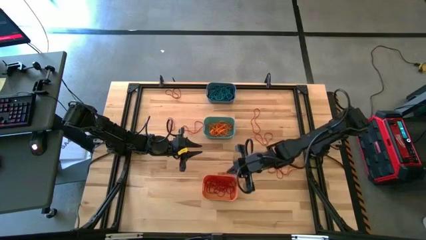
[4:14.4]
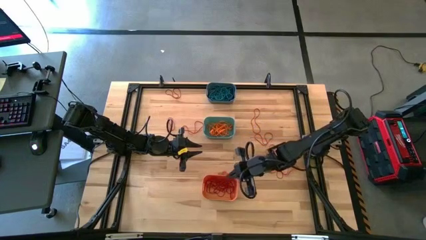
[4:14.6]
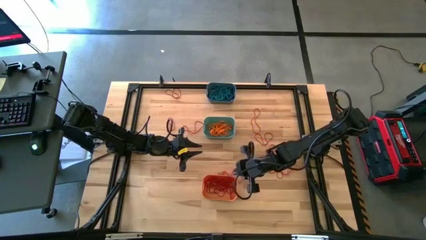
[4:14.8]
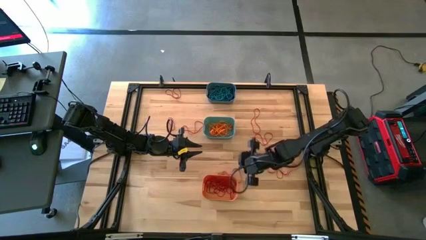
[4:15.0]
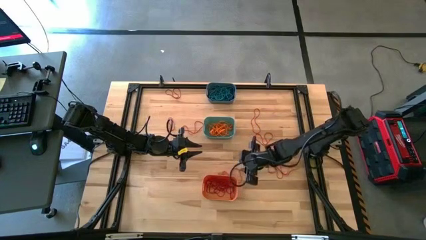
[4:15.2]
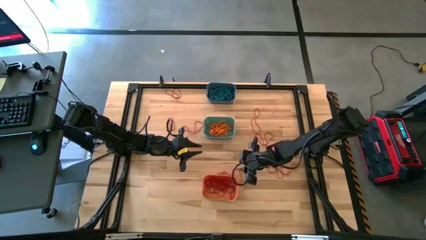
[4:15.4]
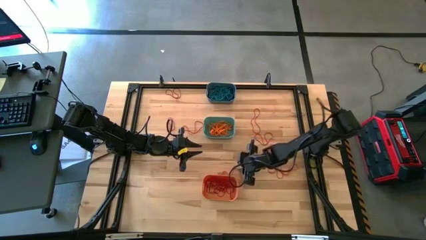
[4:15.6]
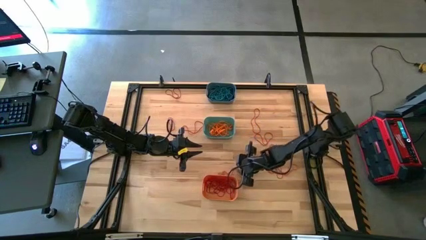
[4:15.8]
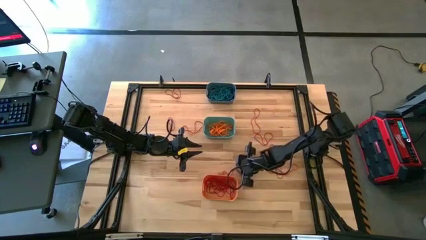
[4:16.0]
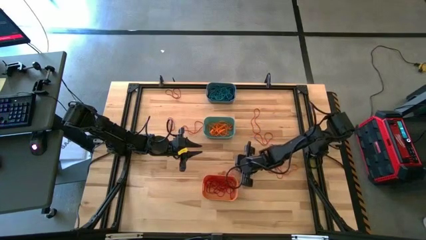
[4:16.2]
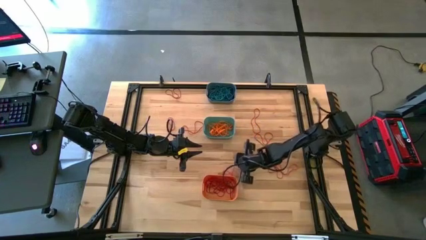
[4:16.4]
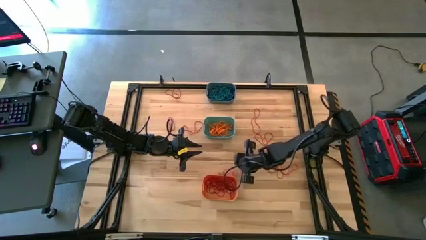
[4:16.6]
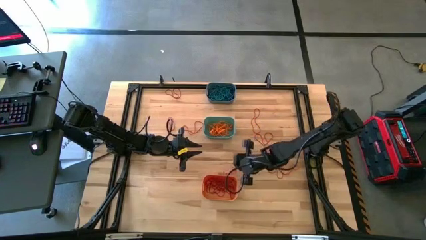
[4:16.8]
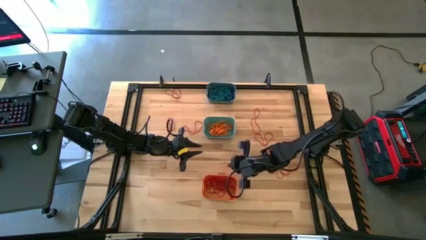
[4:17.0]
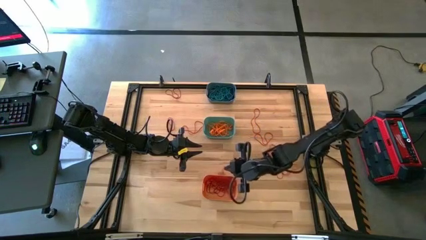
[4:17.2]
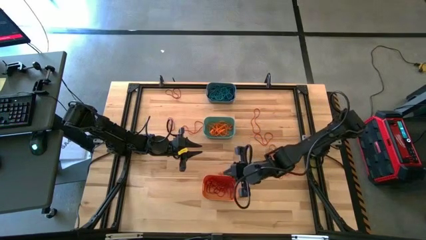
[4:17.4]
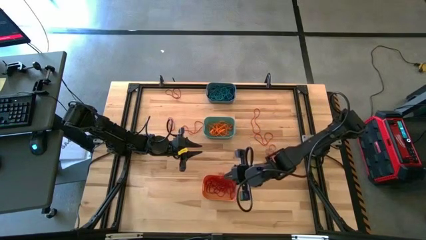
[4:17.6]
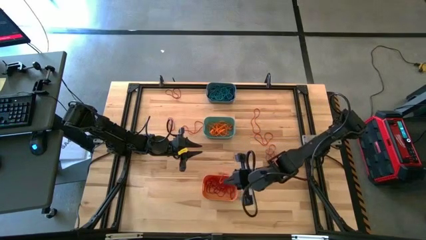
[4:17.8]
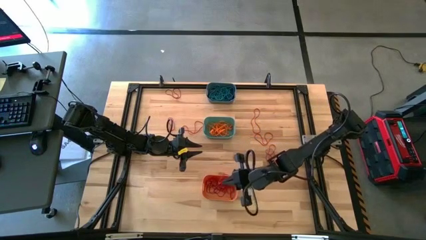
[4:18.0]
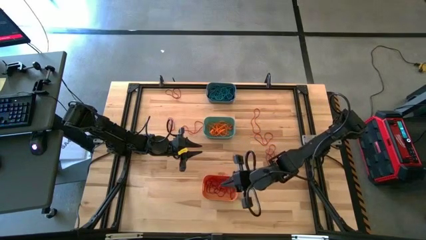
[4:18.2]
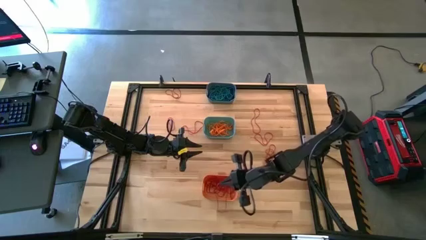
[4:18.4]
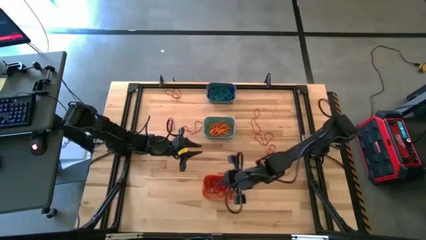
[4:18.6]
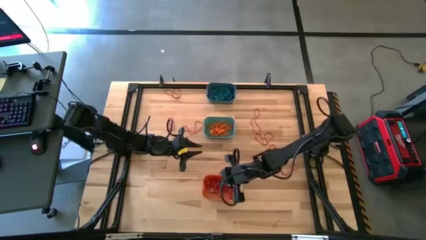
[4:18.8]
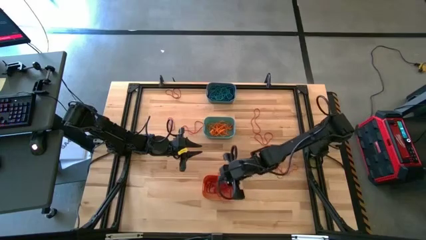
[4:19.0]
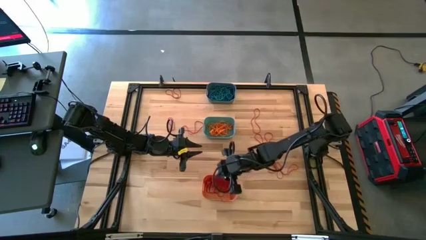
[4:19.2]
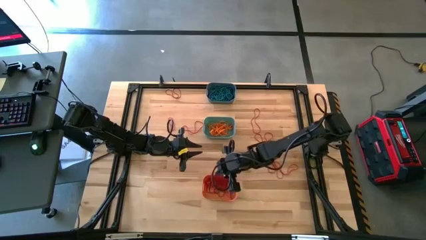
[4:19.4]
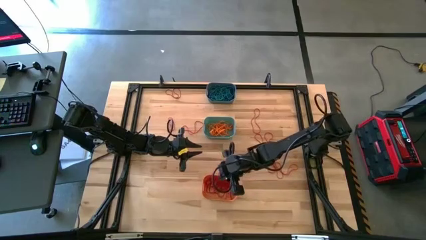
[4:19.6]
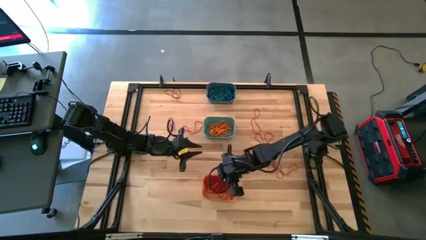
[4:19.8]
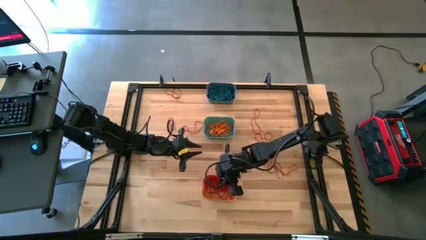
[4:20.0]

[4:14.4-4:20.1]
Task: Sort rubber bands into baskets
Put the red rubber band into the orange bin

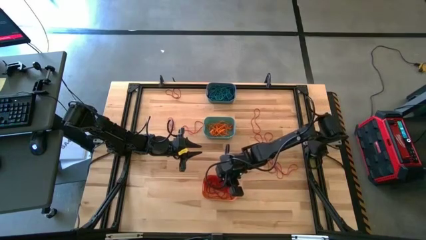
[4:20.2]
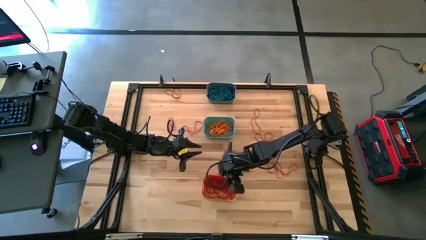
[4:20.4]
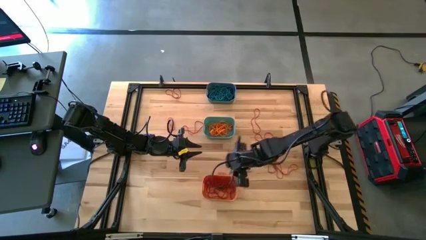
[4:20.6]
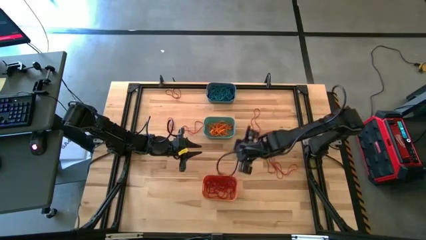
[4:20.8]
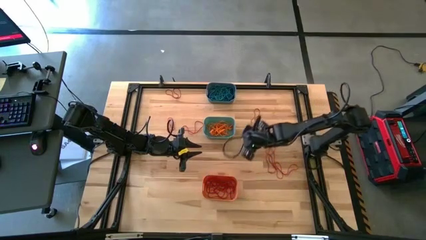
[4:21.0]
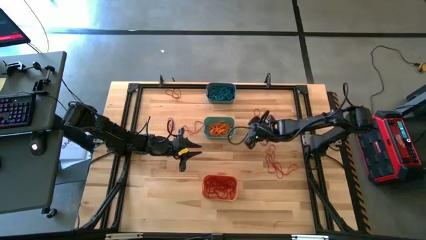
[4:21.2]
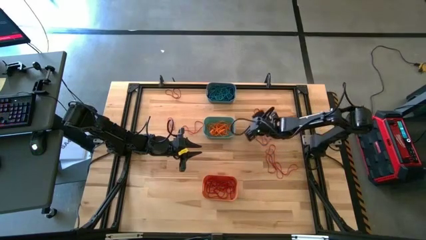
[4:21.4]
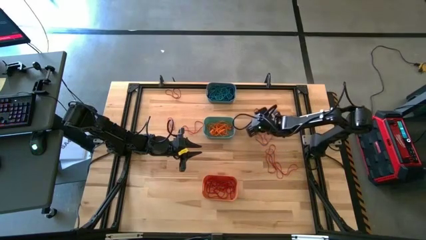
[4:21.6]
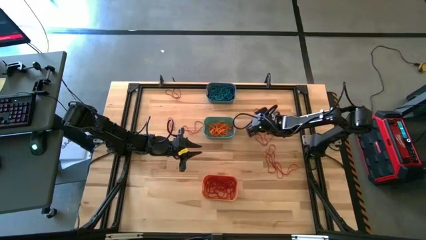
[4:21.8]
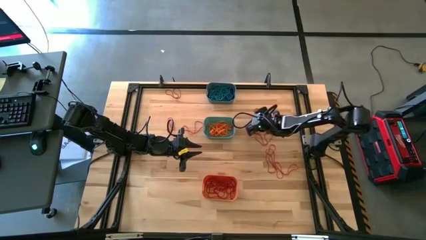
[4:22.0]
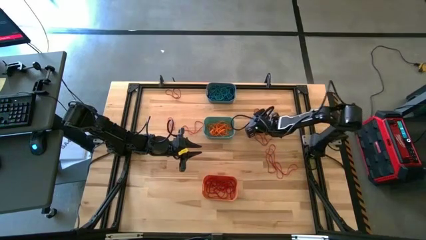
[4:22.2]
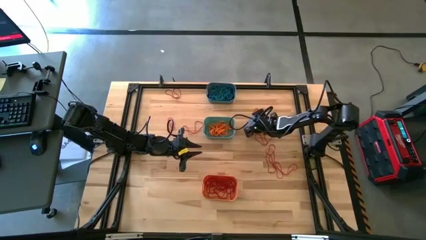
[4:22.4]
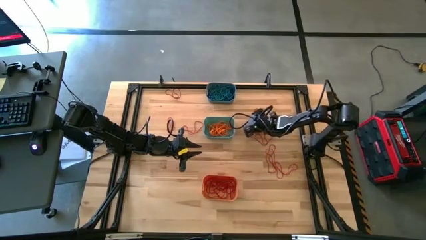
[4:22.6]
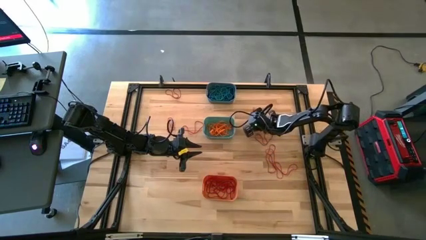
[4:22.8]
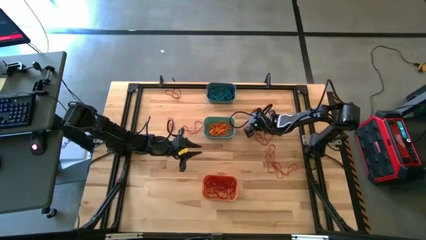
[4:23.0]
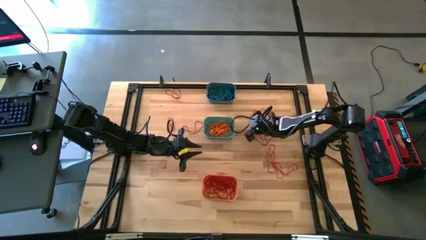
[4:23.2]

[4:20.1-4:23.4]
Put the red rubber band into the orange bin

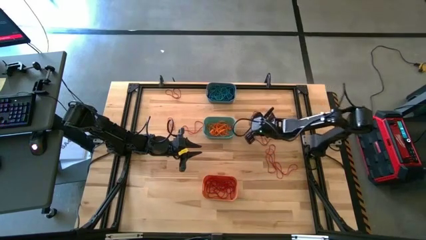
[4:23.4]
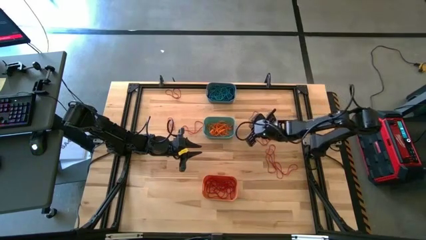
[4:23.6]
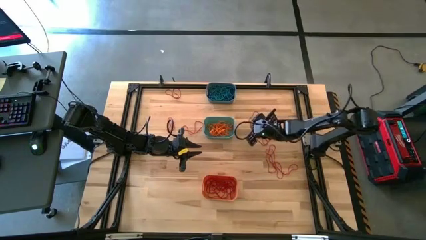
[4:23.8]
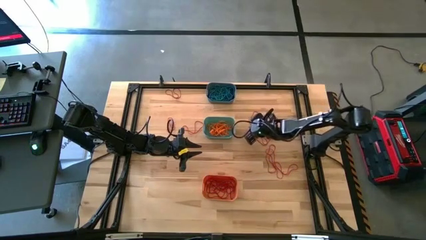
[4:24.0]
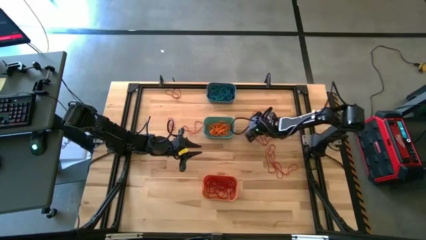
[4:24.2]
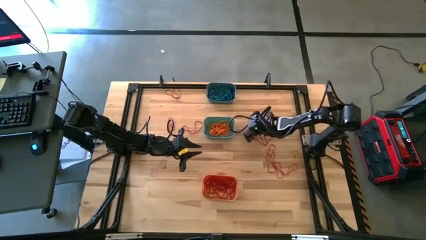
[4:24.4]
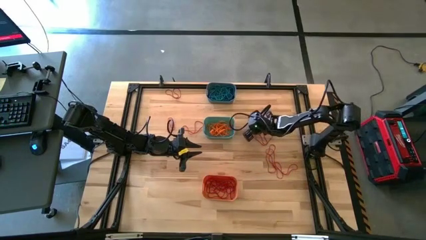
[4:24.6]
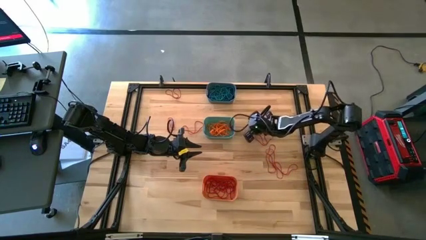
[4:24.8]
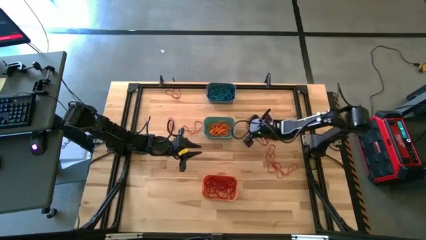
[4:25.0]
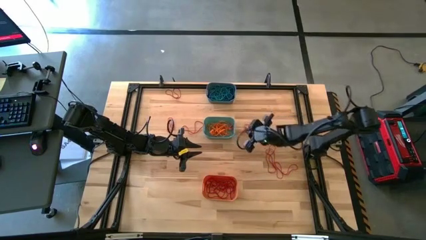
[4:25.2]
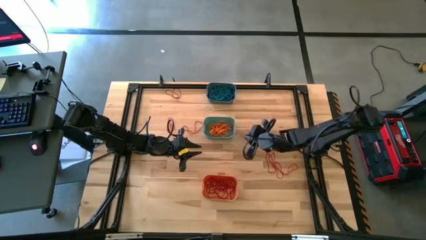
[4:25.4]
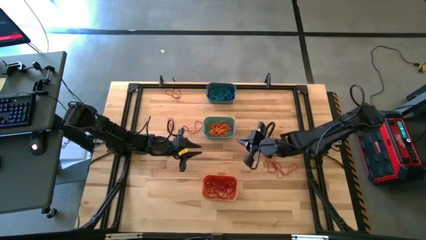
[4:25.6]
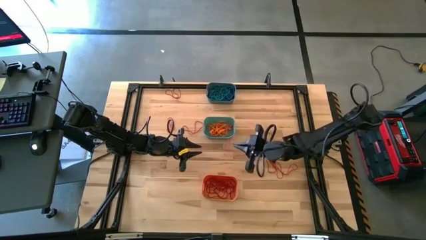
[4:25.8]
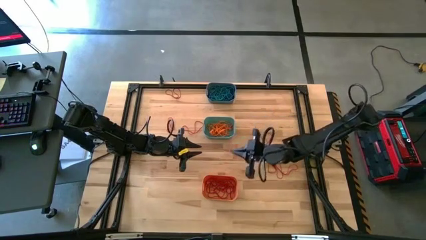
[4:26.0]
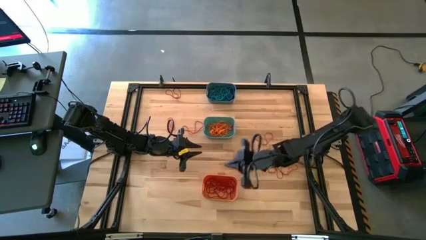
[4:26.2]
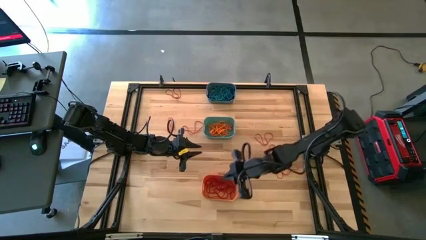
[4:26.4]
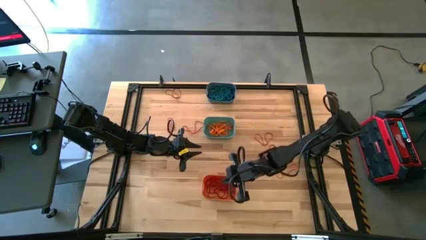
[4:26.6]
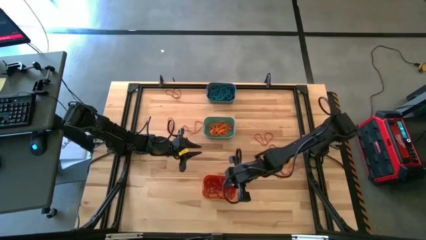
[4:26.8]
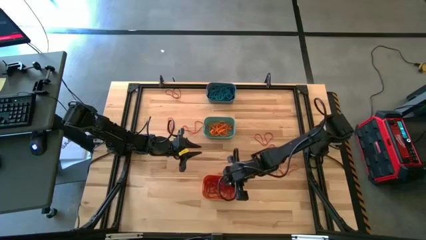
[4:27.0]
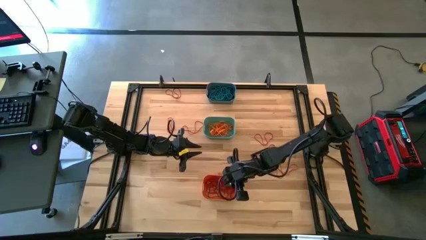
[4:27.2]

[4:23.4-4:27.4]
Put the red rubber band into the orange bin

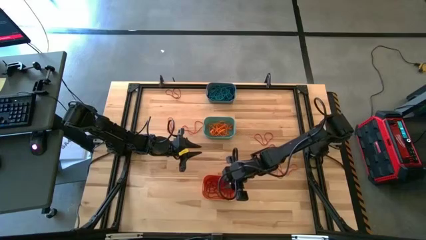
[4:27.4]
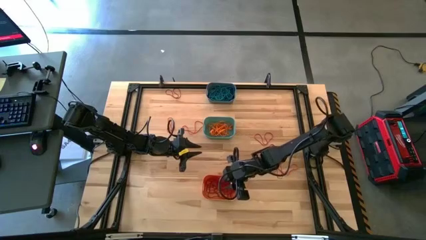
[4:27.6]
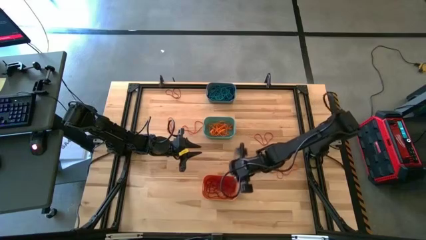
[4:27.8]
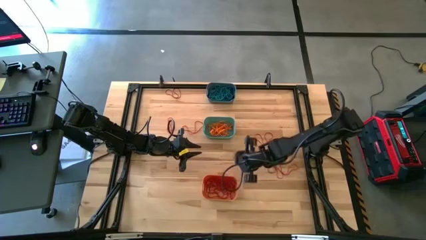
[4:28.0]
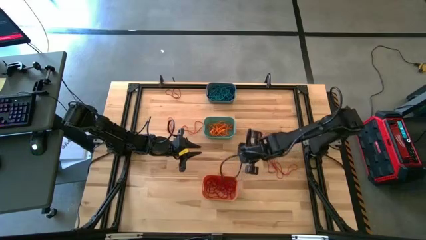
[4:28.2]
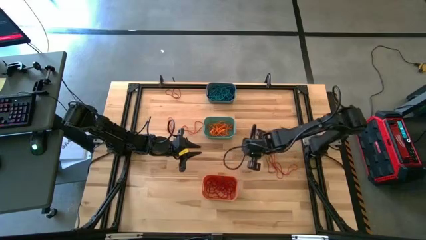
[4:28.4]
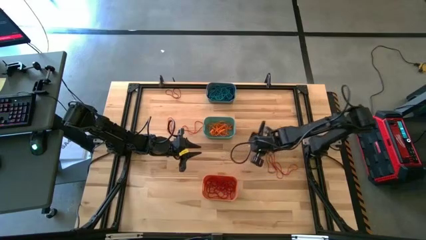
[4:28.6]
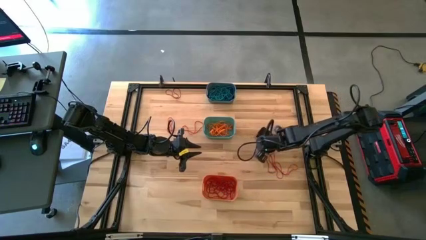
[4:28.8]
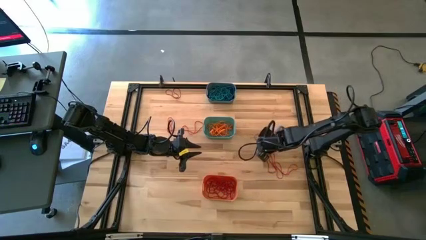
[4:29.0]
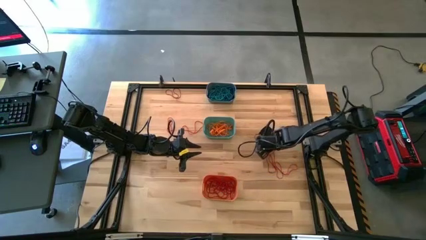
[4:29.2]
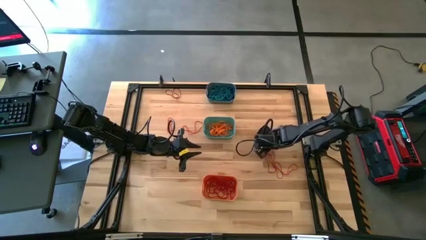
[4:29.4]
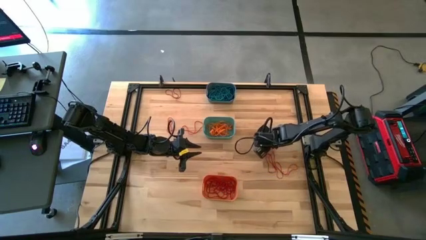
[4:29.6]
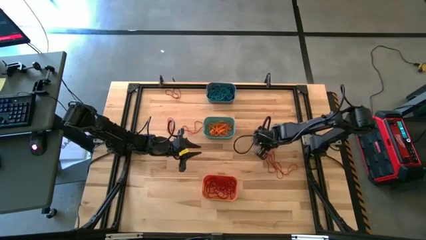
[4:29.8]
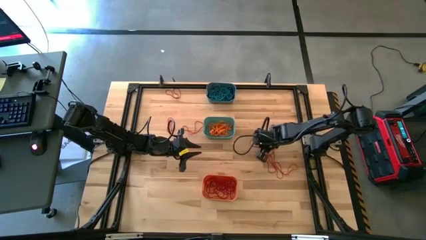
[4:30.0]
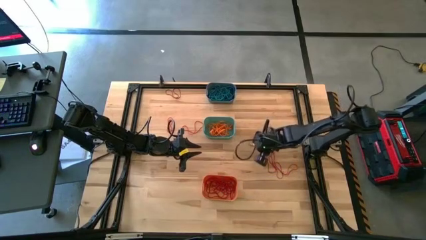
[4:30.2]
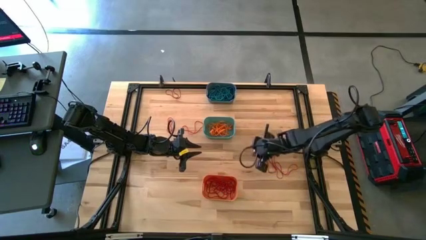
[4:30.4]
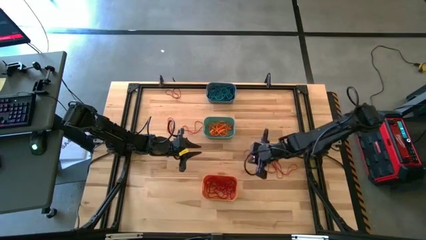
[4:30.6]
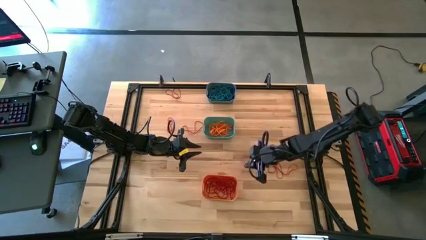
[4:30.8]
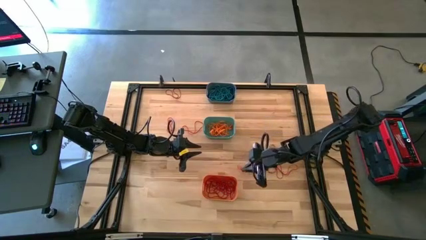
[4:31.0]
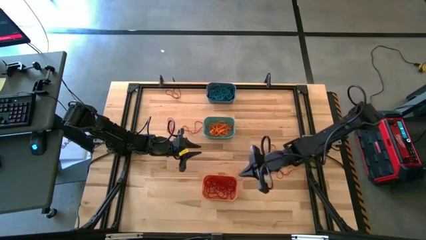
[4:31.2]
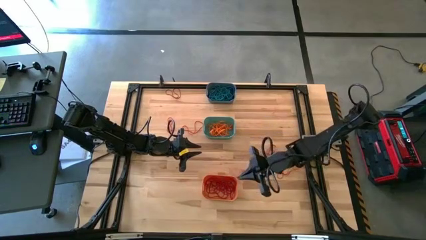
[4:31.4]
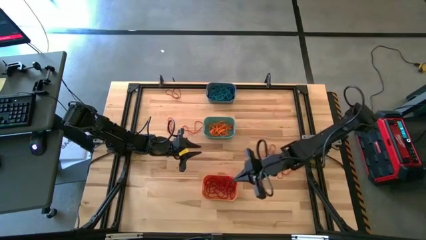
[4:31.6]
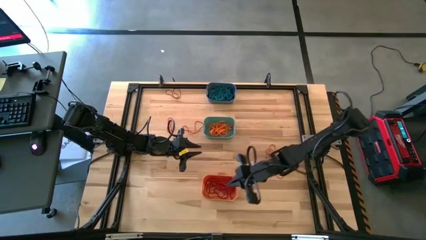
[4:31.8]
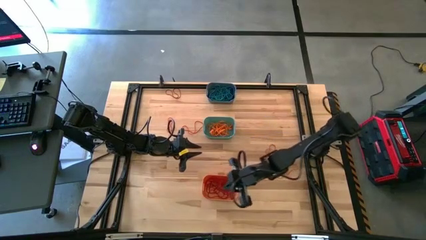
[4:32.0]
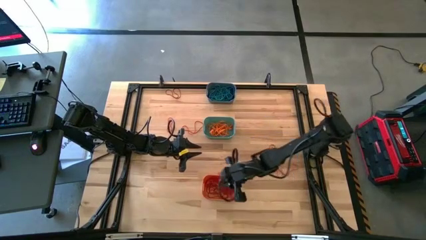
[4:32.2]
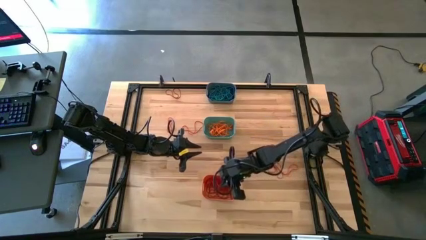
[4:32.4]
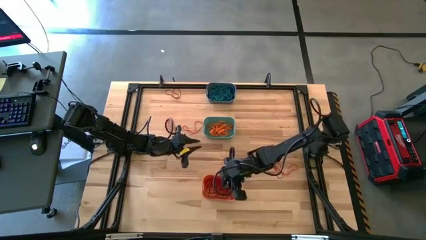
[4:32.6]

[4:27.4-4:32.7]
Put the red rubber band into the orange bin
